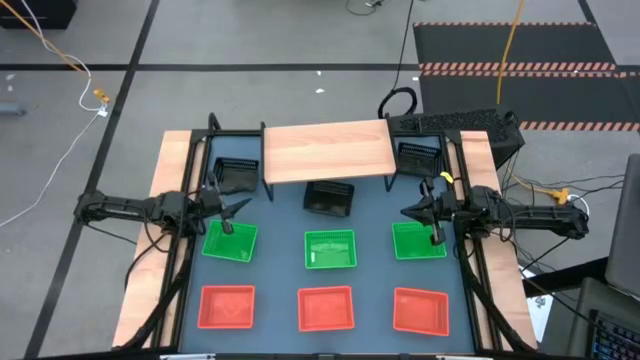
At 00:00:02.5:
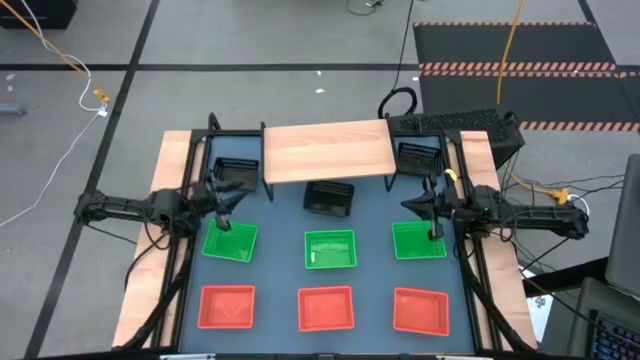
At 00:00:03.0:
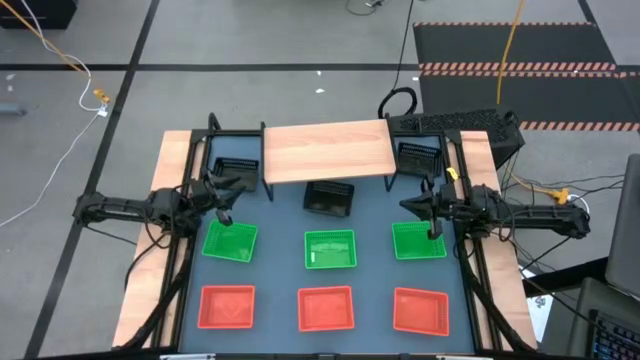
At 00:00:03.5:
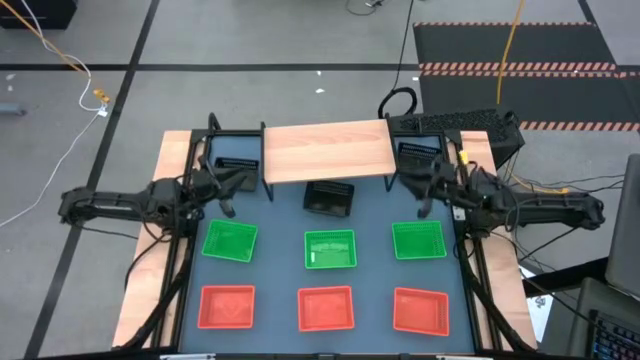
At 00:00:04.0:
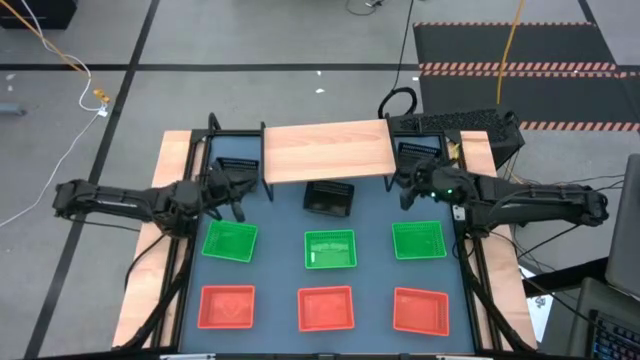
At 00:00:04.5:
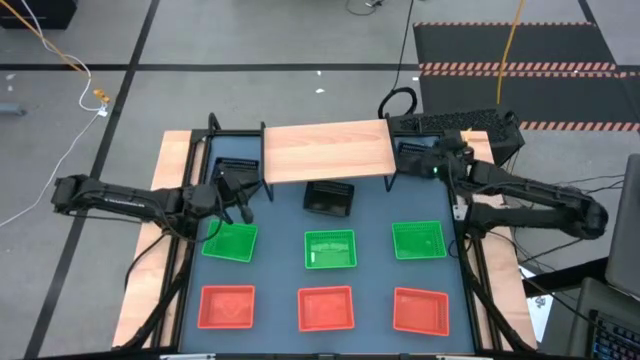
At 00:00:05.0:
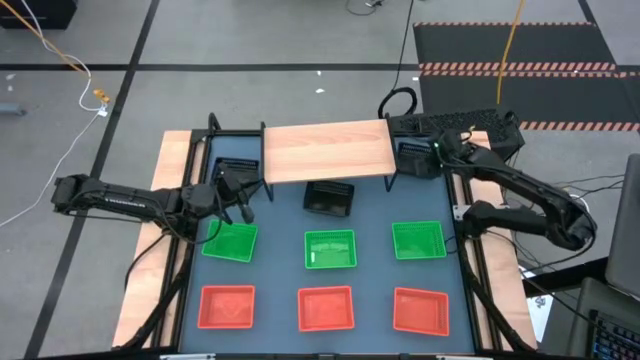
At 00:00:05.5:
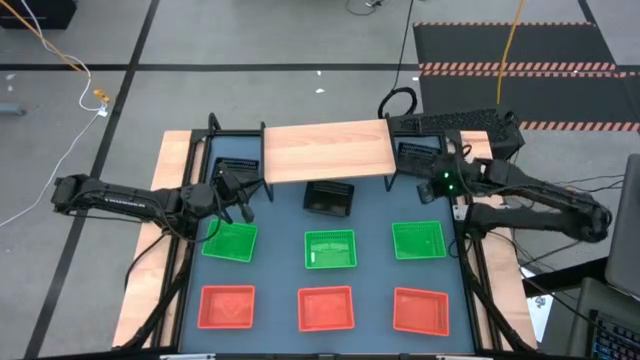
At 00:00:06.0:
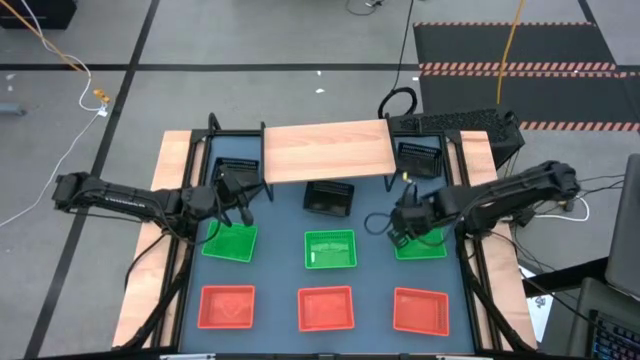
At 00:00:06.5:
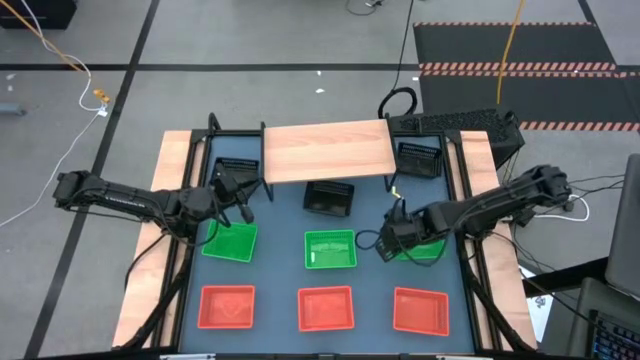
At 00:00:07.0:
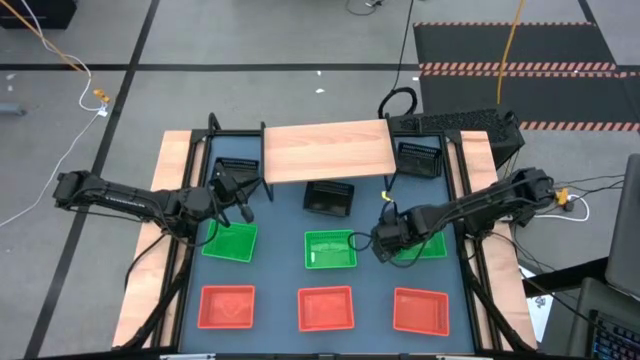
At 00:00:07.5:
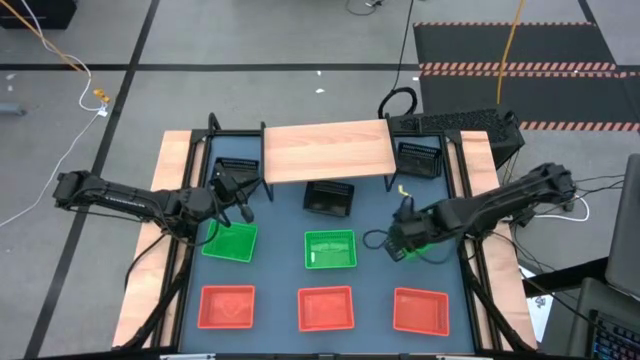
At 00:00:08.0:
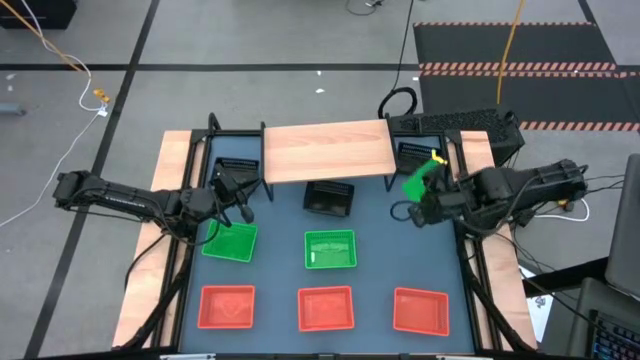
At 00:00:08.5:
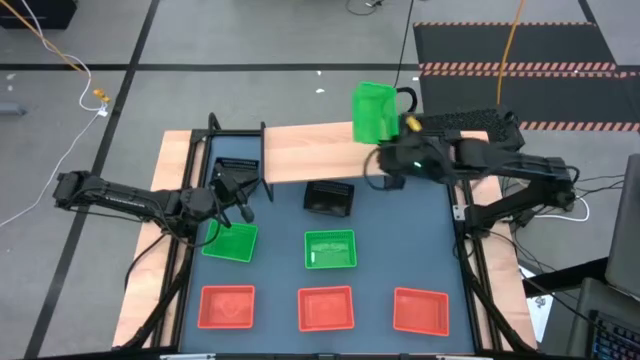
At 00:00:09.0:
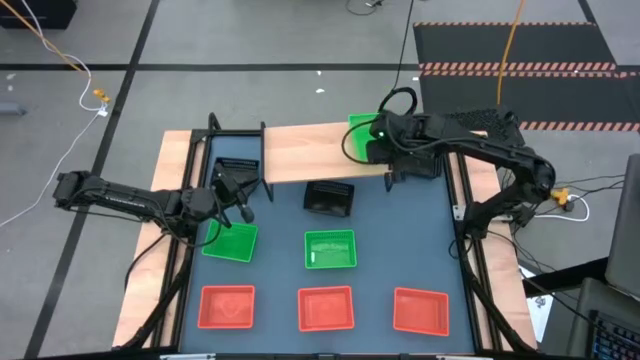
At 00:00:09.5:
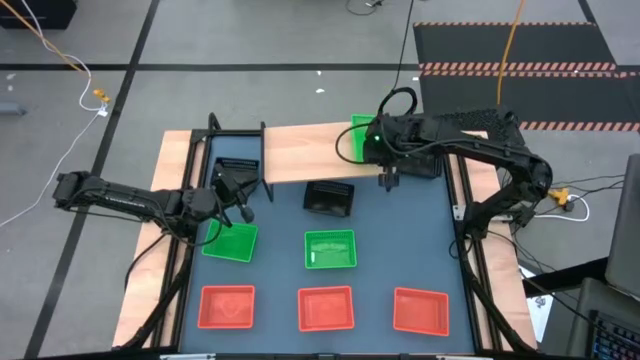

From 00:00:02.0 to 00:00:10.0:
Task: Stack baskets on shelf by color
Put the middle right green bin on the shelf

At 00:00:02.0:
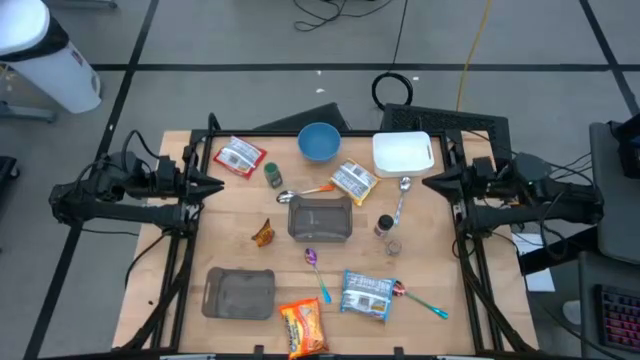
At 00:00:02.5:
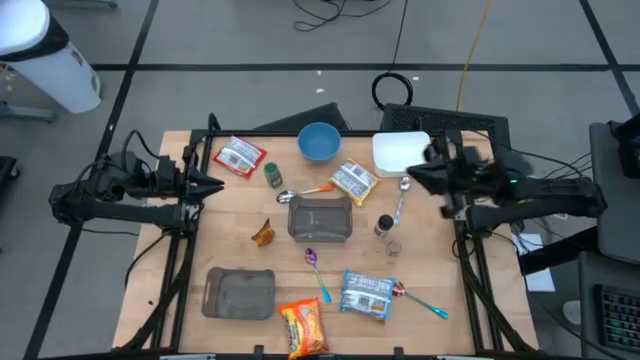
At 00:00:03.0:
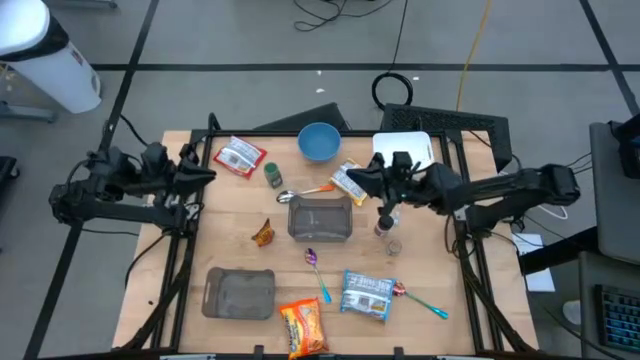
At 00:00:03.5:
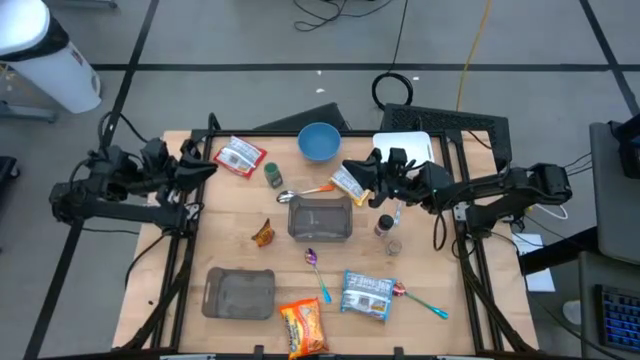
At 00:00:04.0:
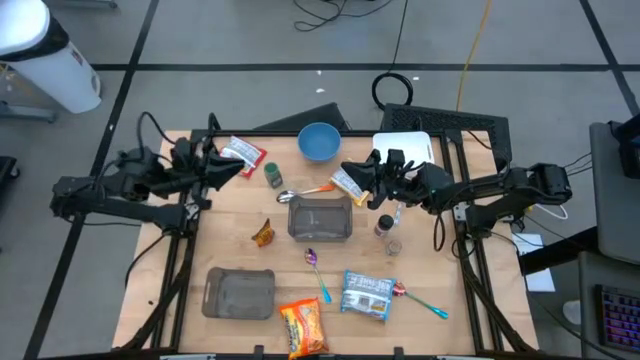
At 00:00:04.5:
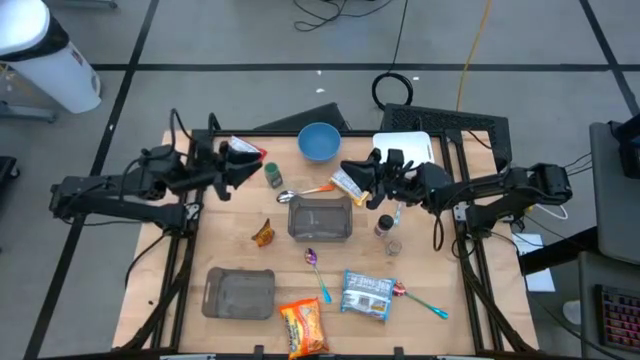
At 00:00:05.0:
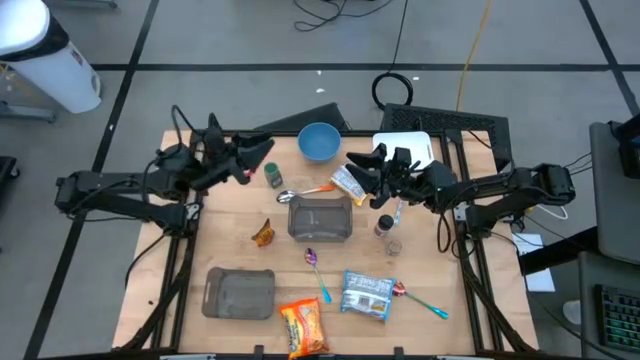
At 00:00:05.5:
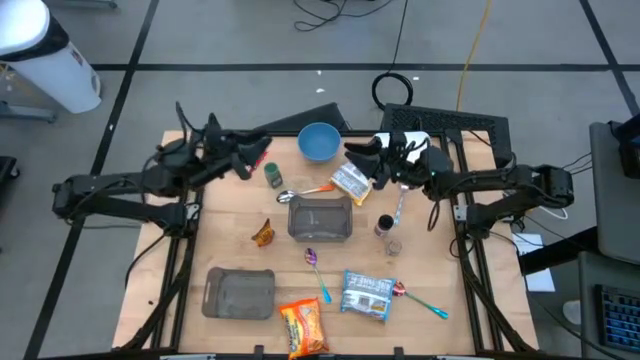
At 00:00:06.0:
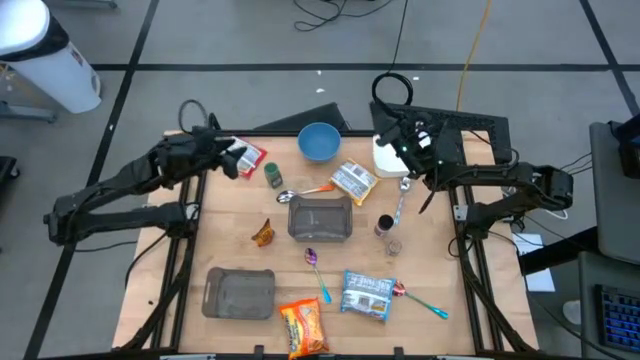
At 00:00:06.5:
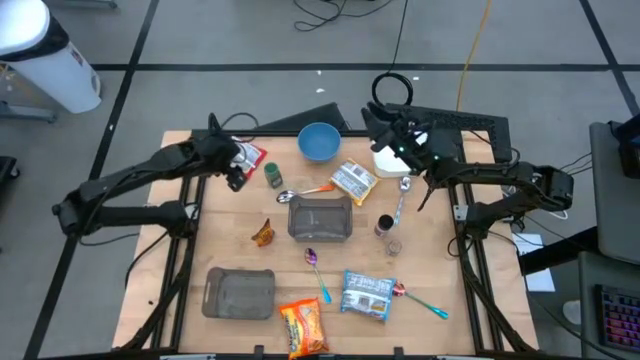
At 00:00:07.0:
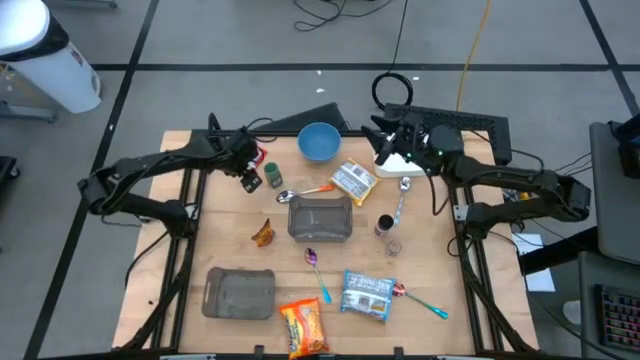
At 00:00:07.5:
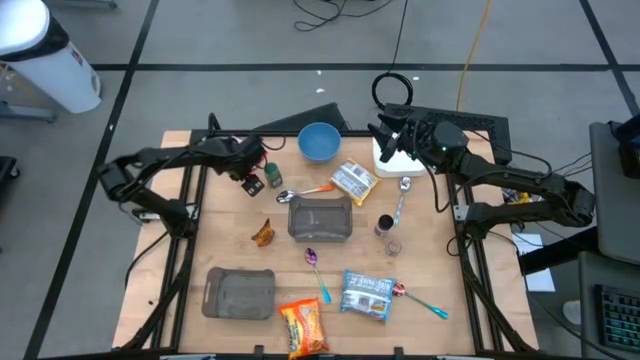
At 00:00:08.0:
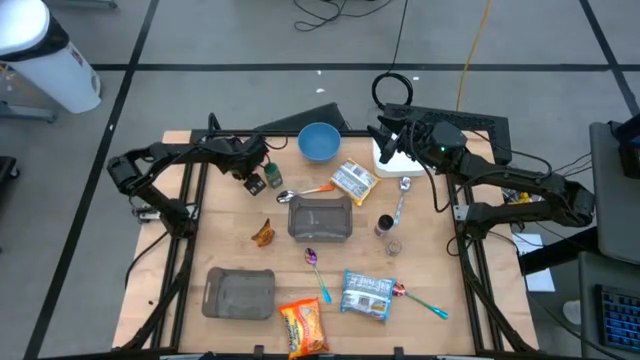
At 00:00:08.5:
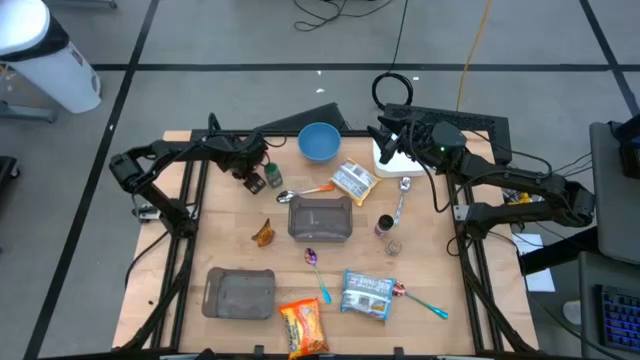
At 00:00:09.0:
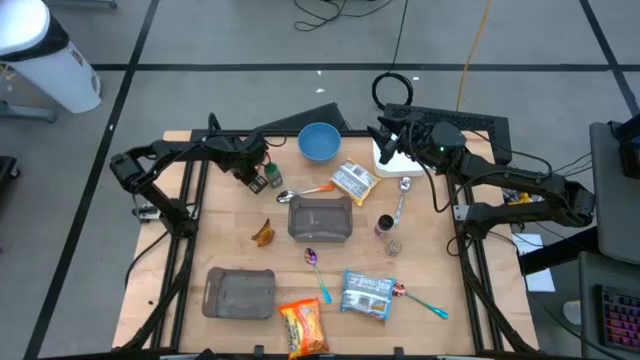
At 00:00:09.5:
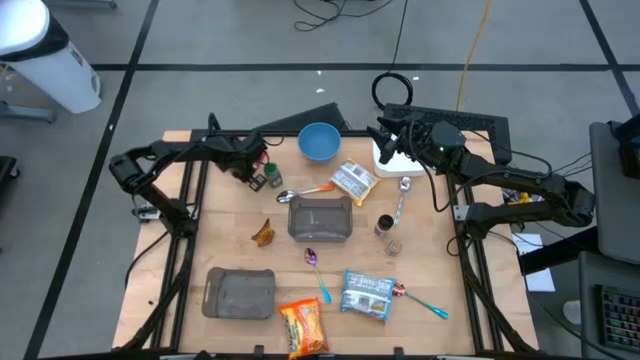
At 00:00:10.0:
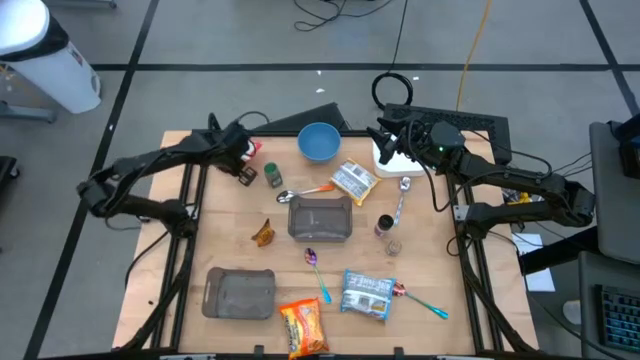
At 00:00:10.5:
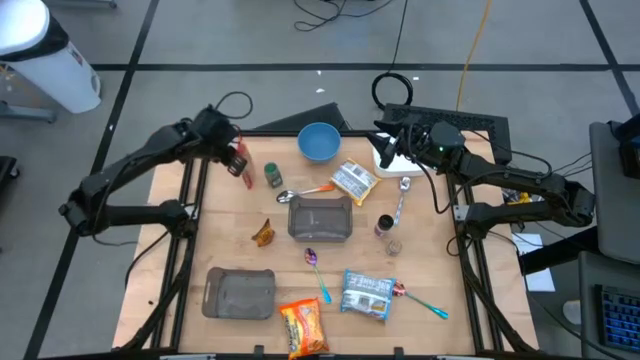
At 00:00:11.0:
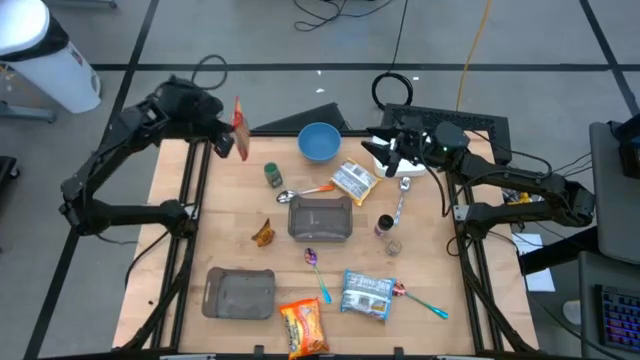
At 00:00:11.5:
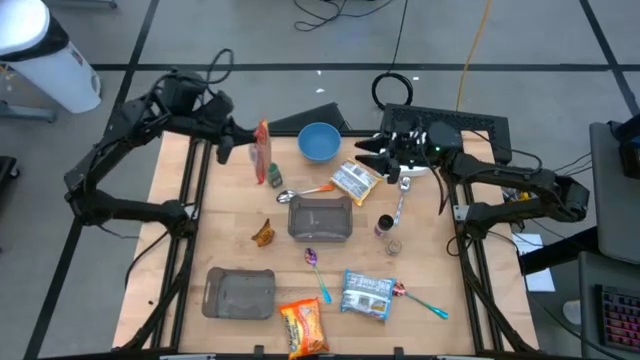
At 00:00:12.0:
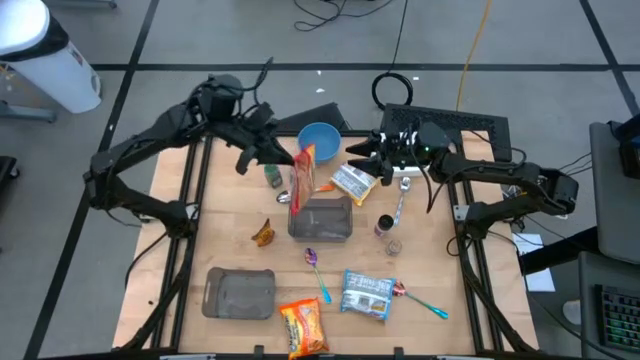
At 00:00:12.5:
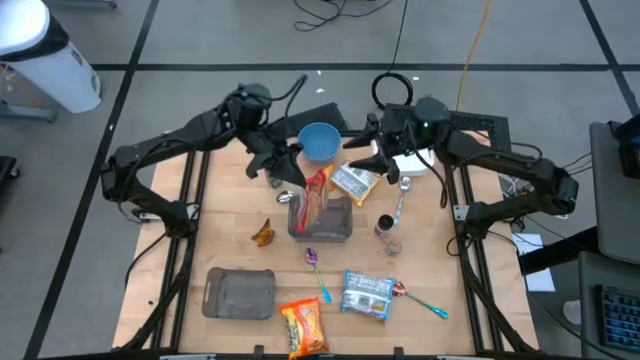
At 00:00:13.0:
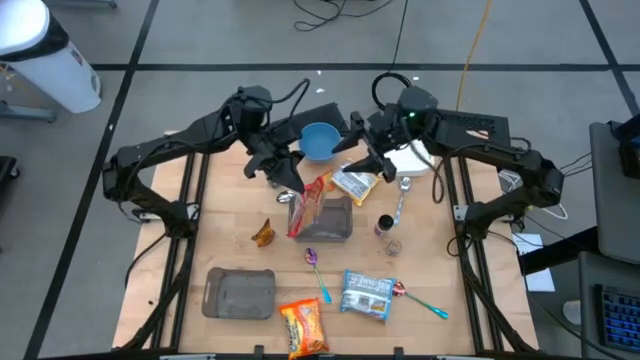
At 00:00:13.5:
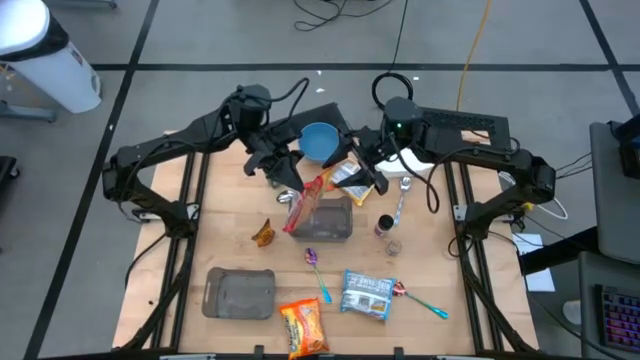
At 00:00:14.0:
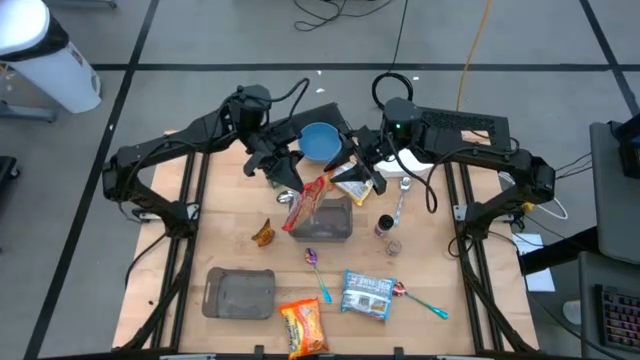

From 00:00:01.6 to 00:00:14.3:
Task: Pick & Place Food Item
Put the red noodle pack into the top black bin
